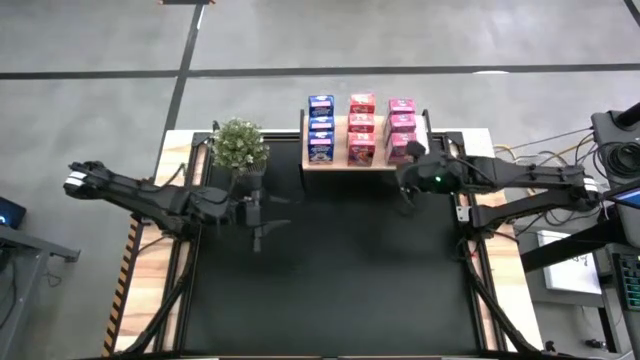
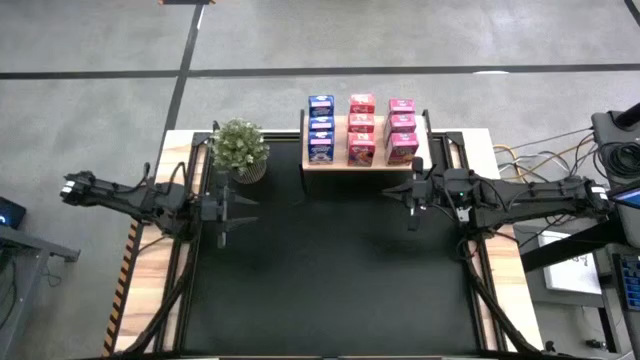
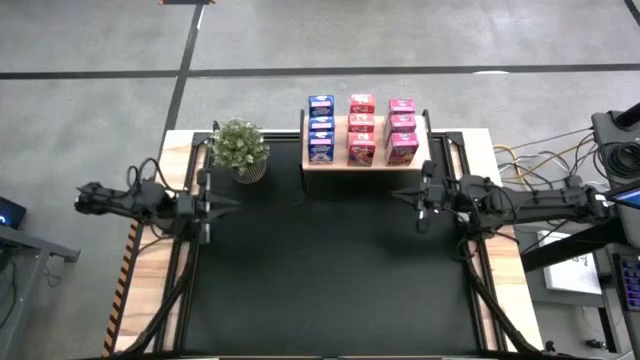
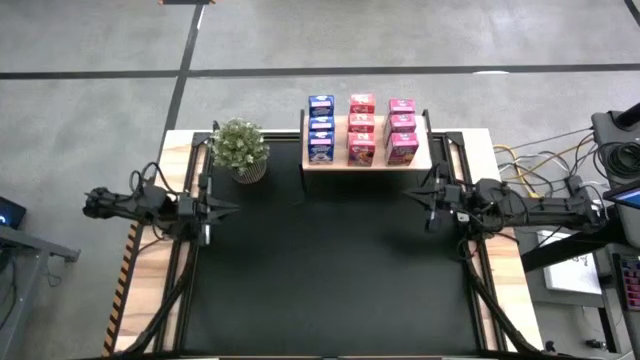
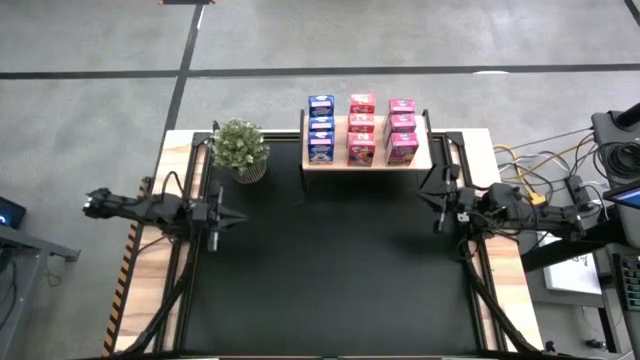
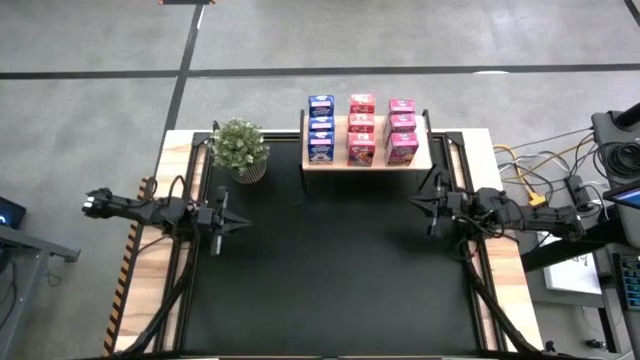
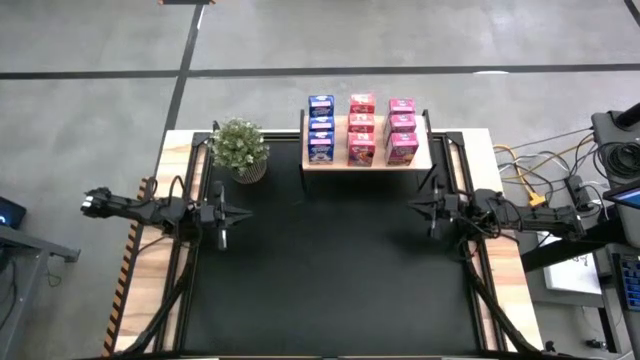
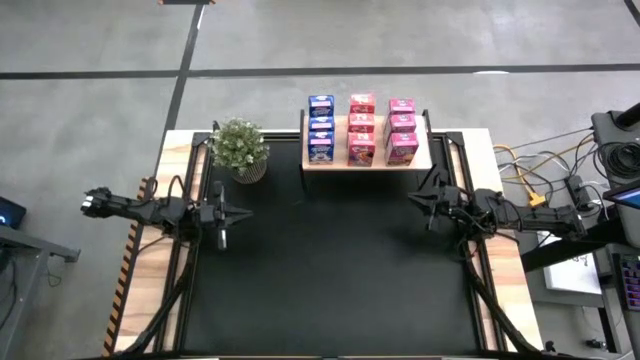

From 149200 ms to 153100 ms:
Task: Stack cereal on shelf
Return to Home Position

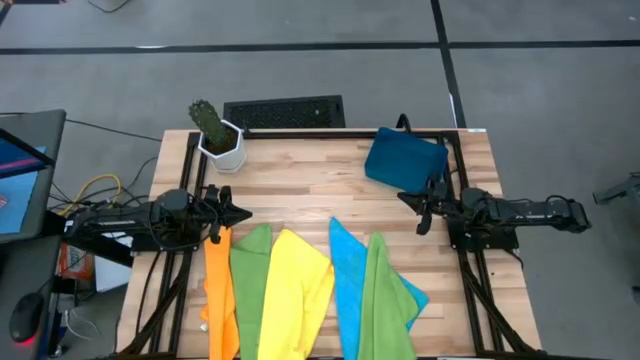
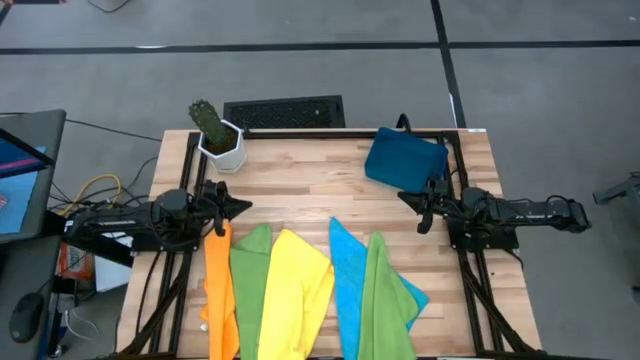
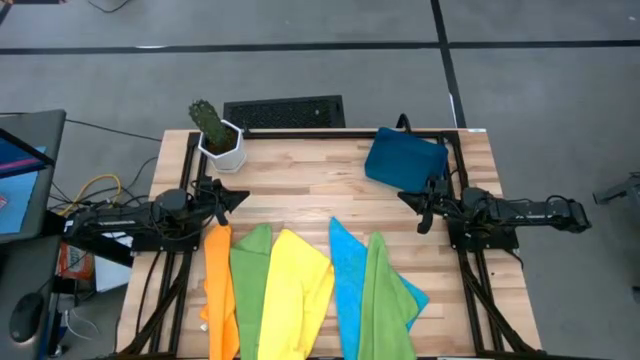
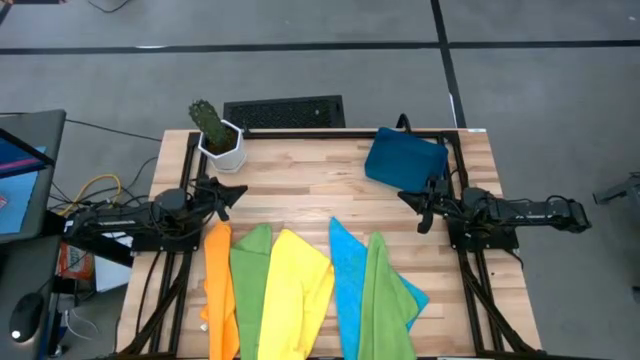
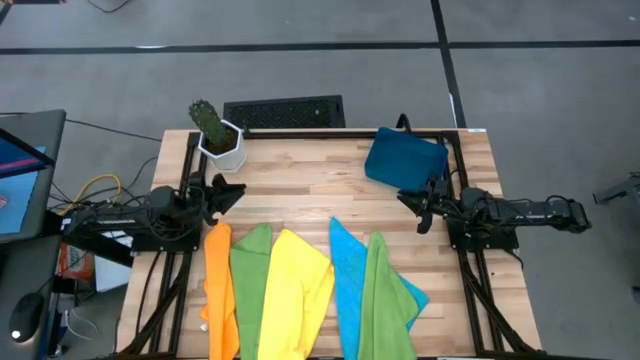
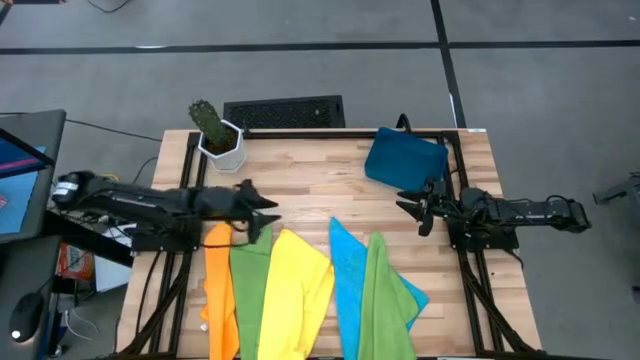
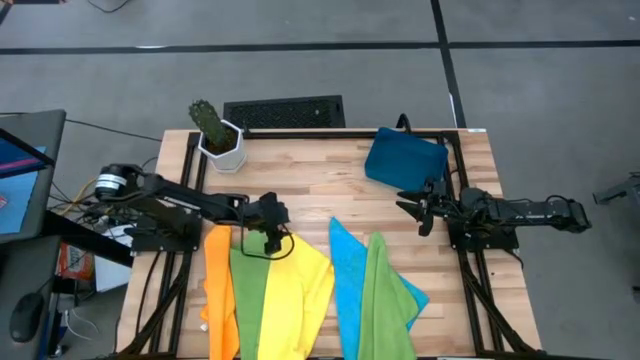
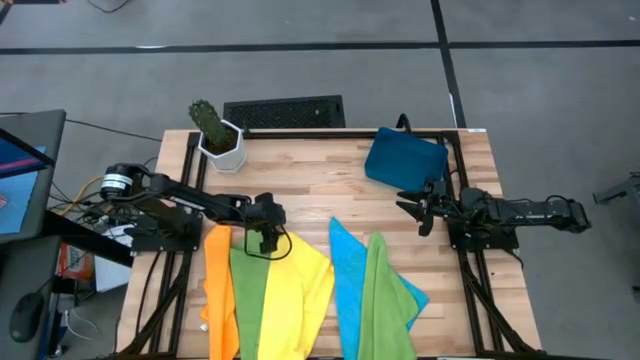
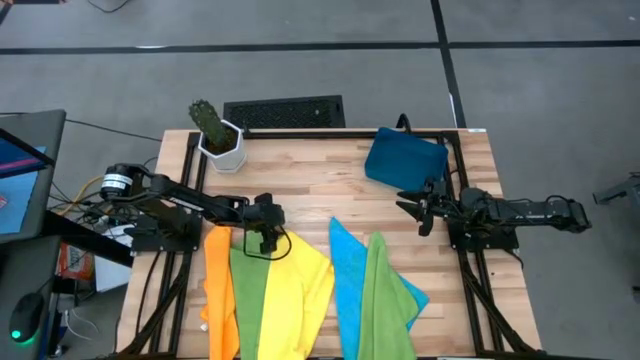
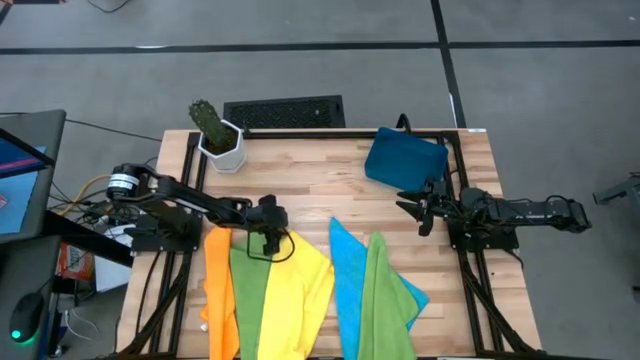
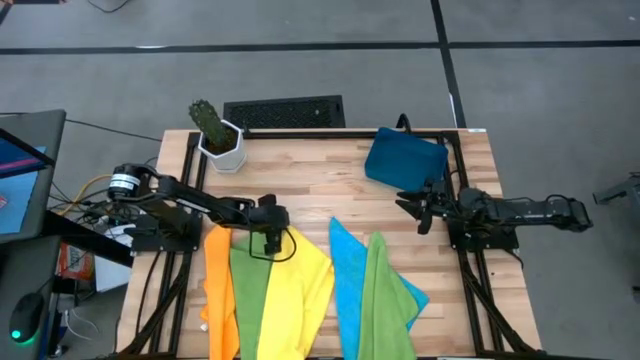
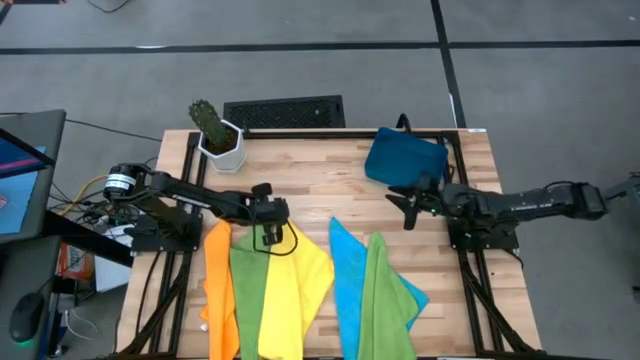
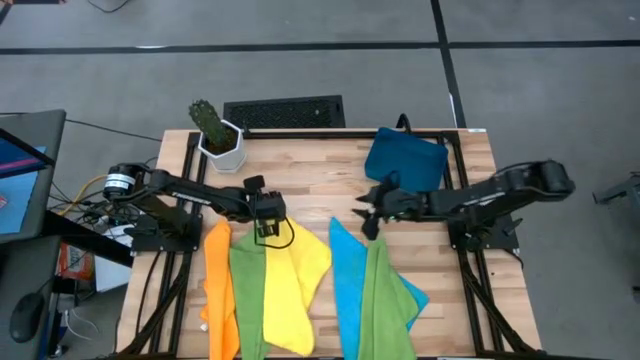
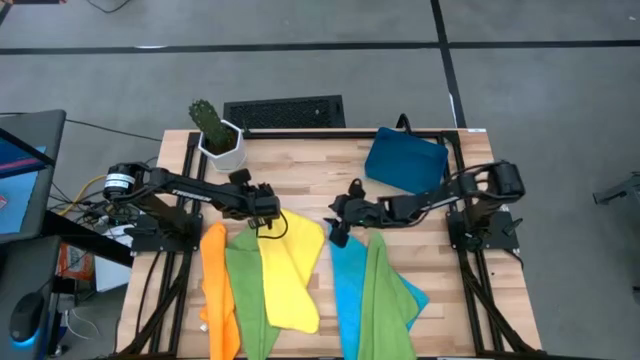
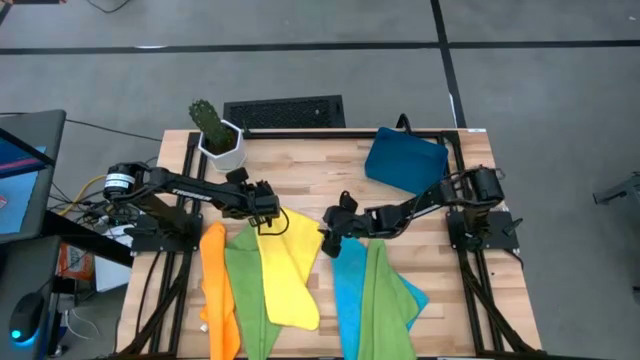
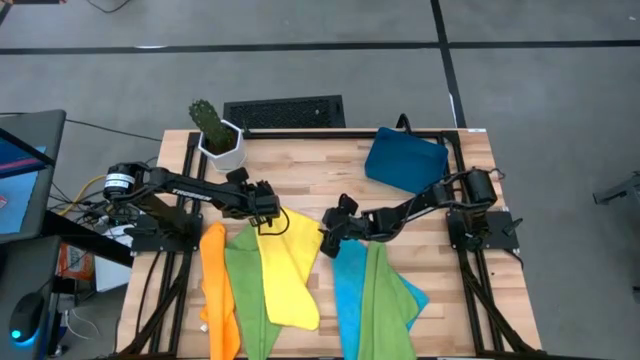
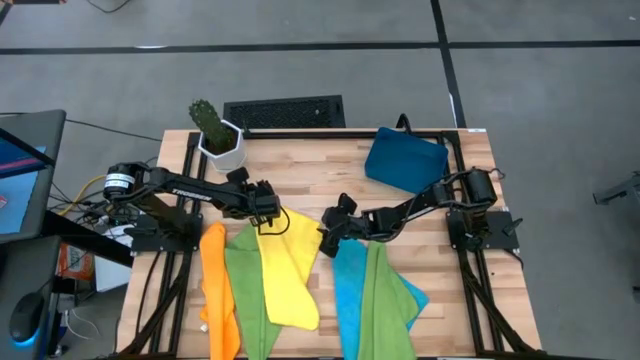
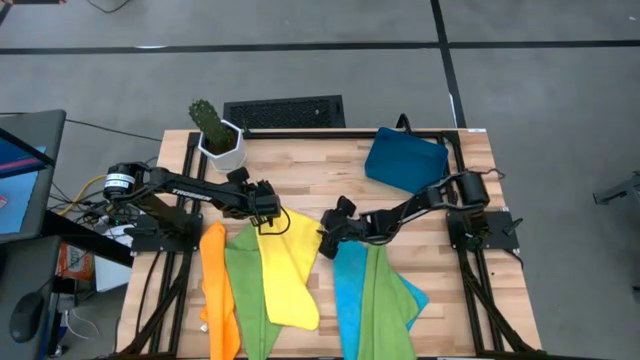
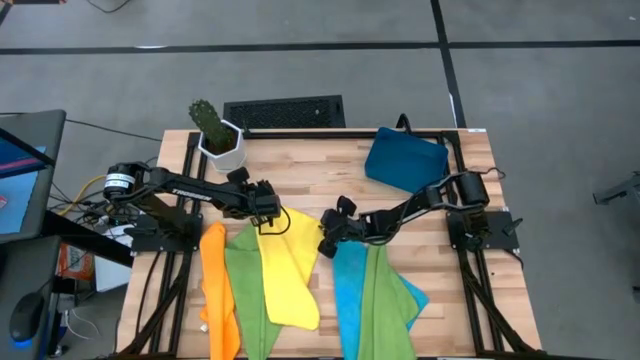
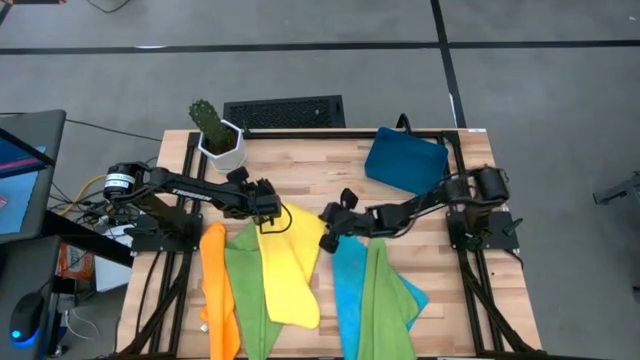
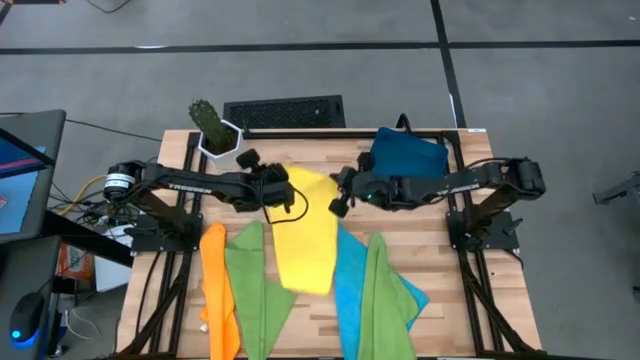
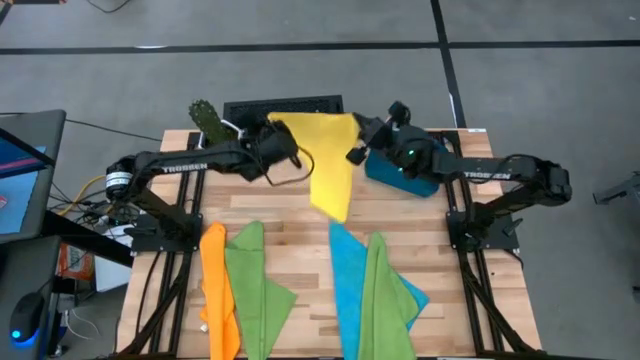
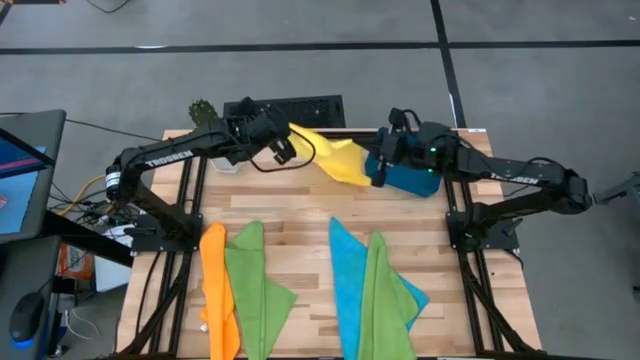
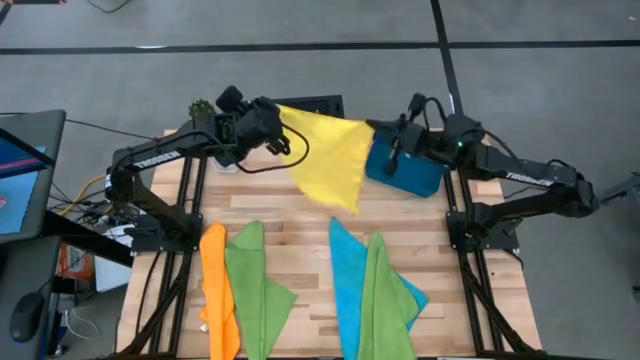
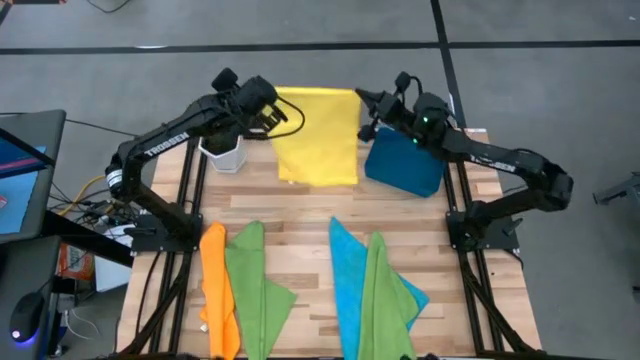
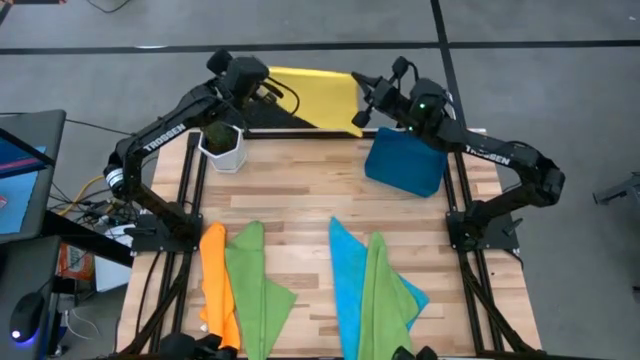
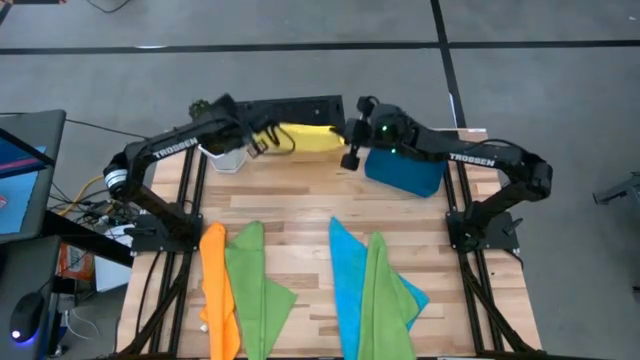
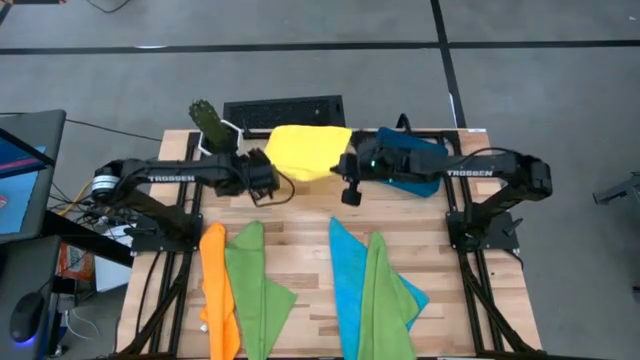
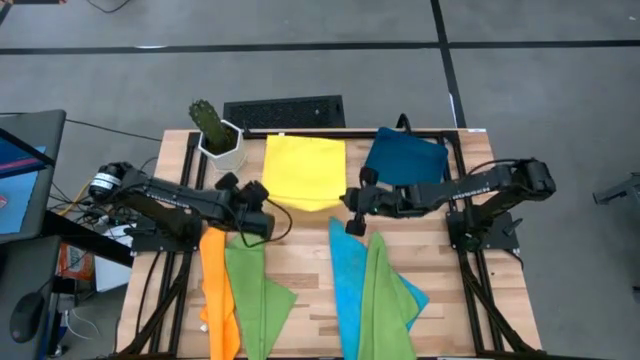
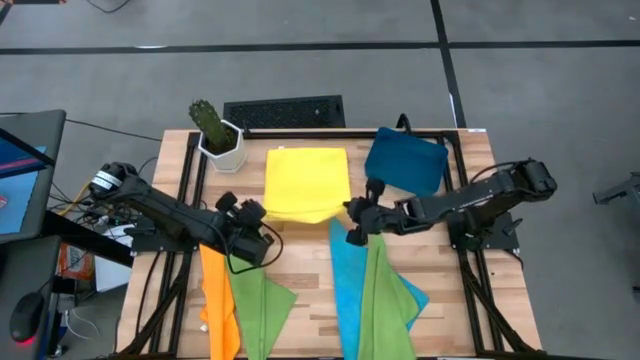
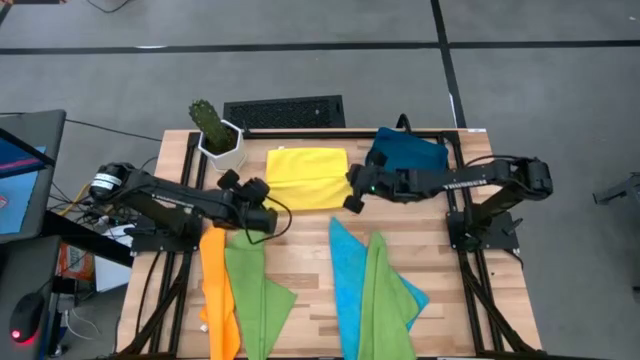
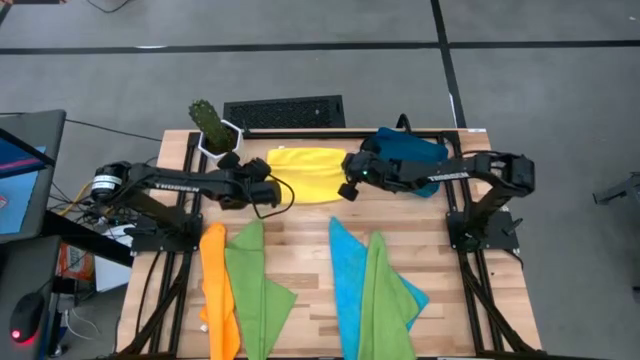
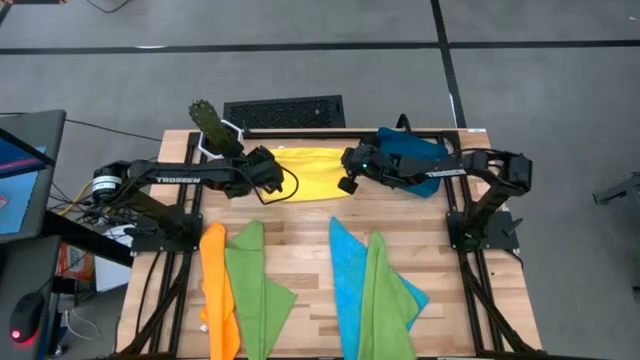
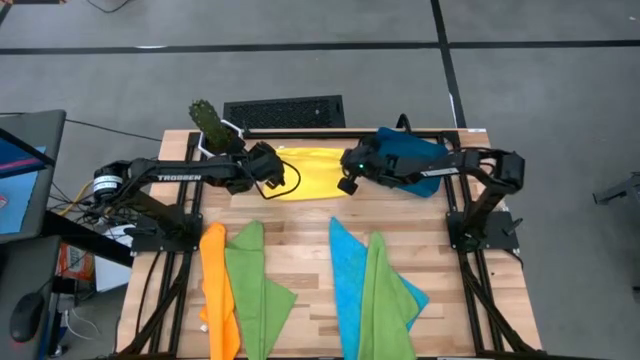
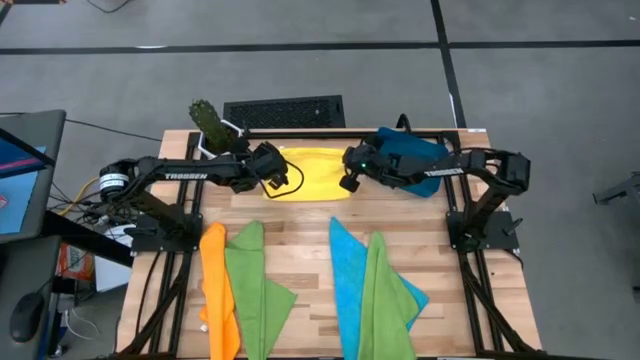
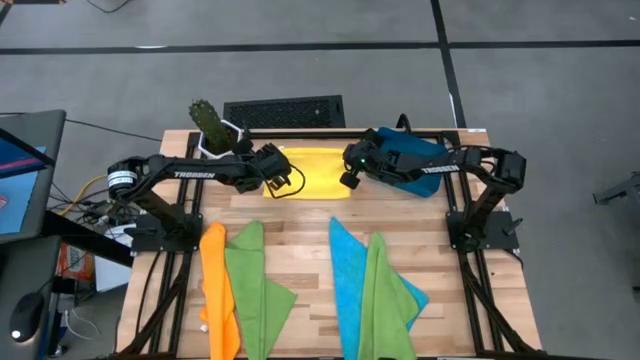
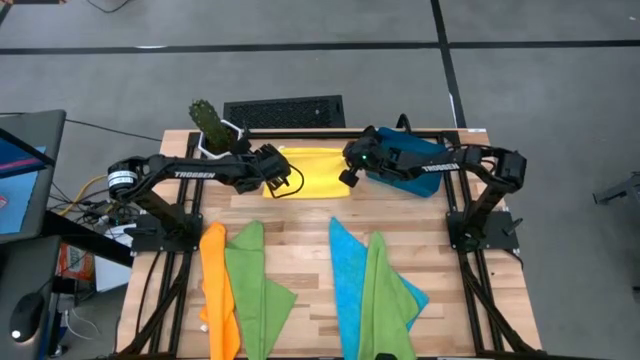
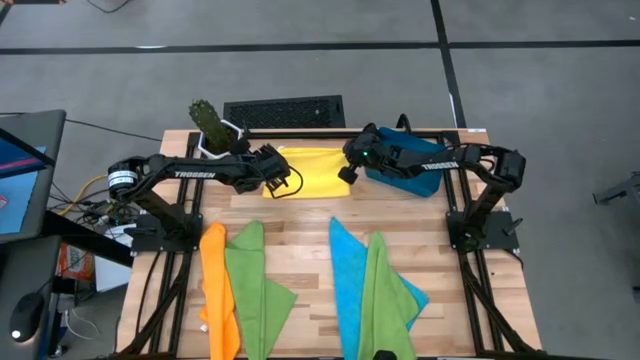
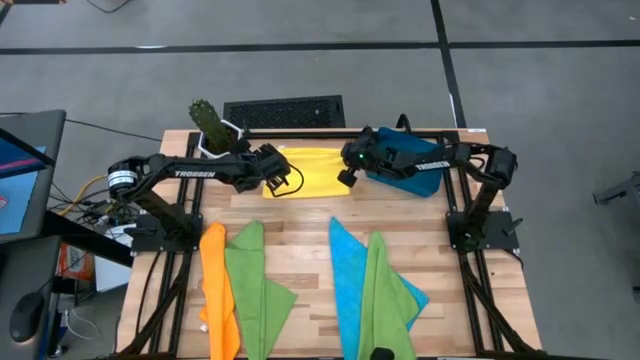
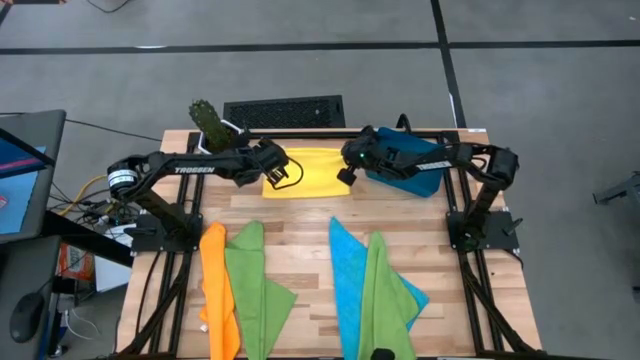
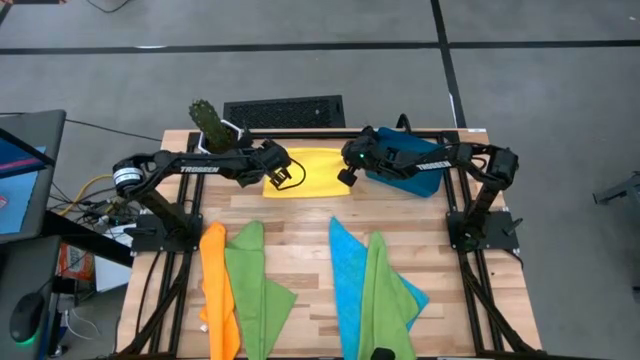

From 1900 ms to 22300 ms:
Task: Fold microfiber towels
Fold the yellow microfiber cloth
